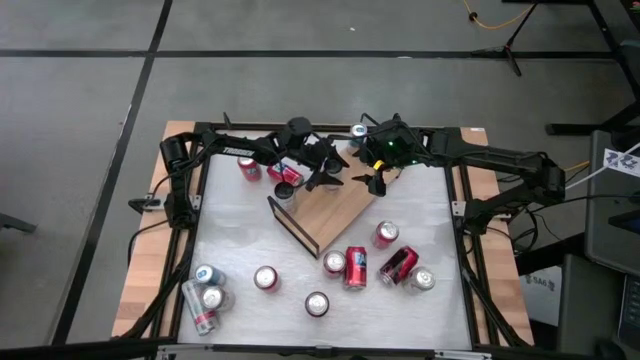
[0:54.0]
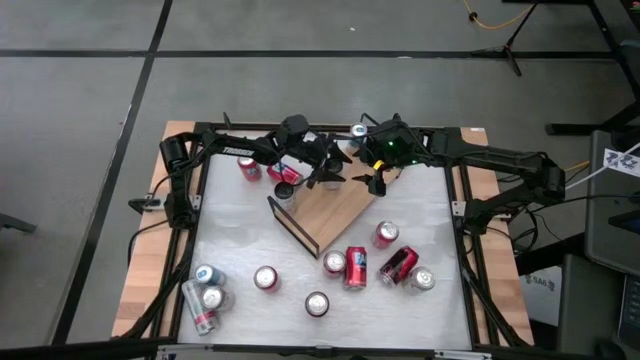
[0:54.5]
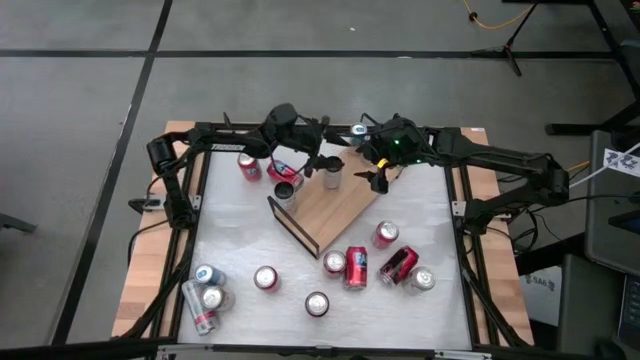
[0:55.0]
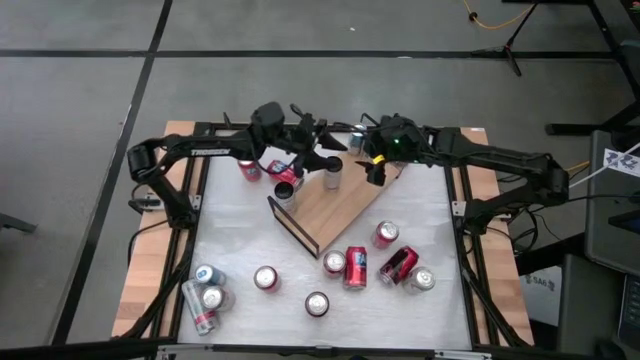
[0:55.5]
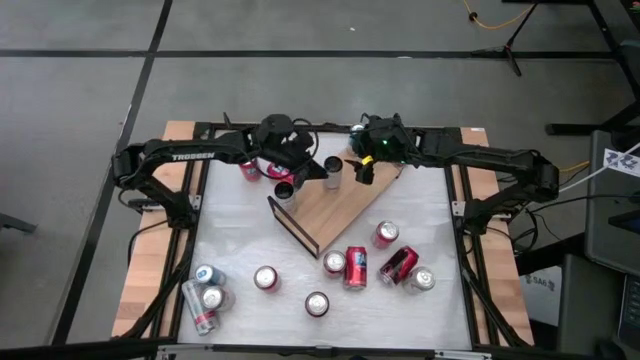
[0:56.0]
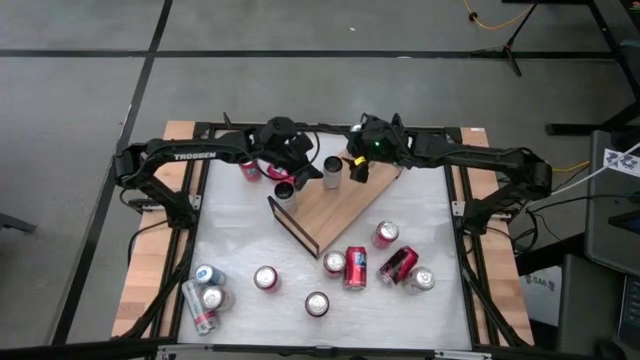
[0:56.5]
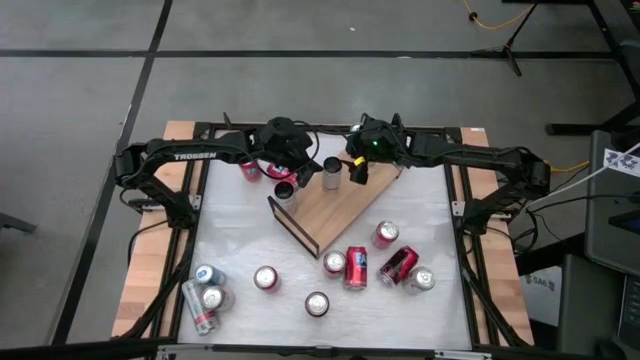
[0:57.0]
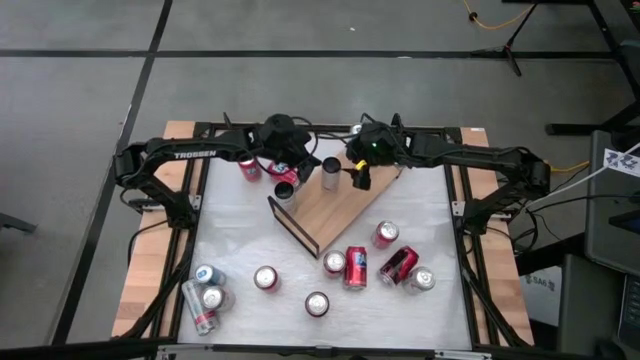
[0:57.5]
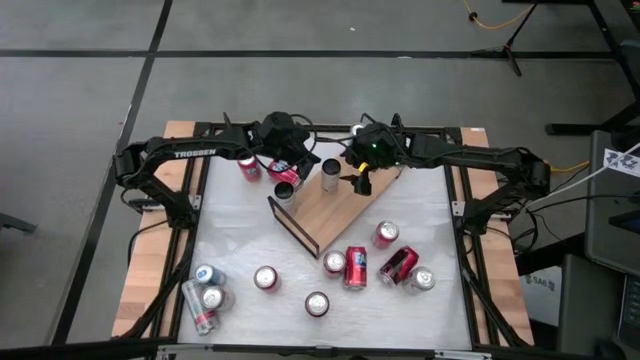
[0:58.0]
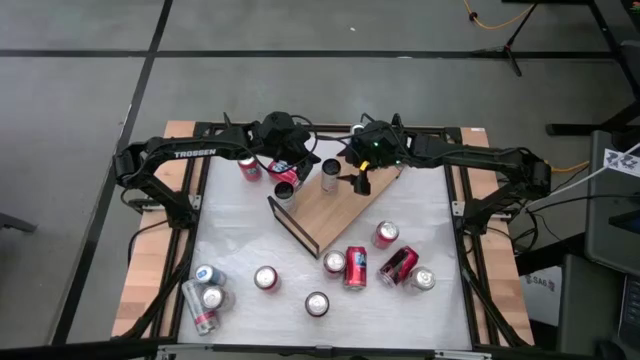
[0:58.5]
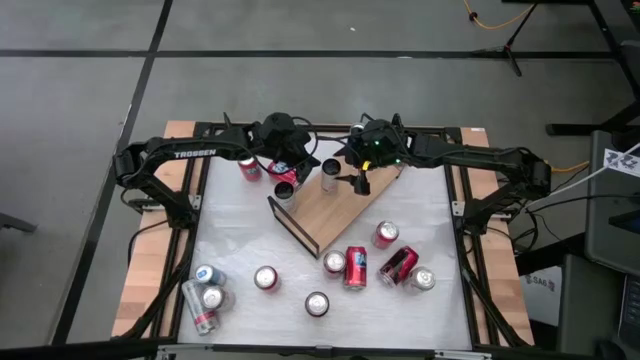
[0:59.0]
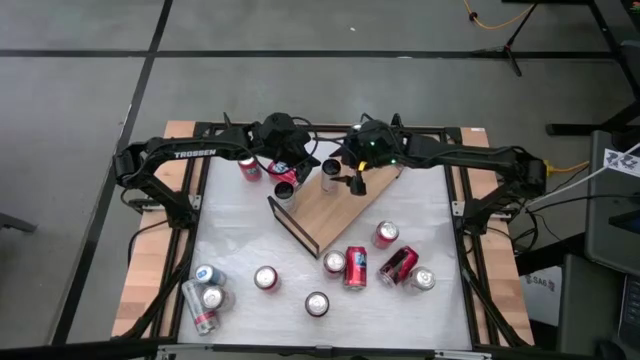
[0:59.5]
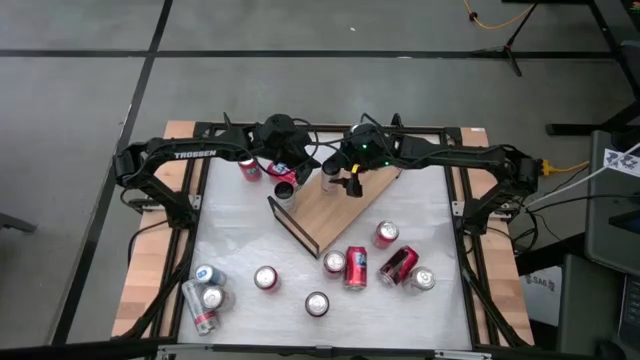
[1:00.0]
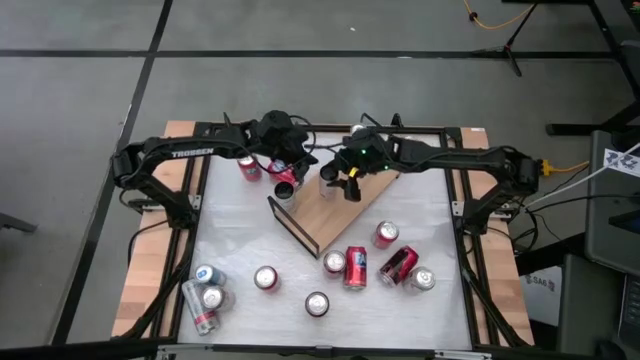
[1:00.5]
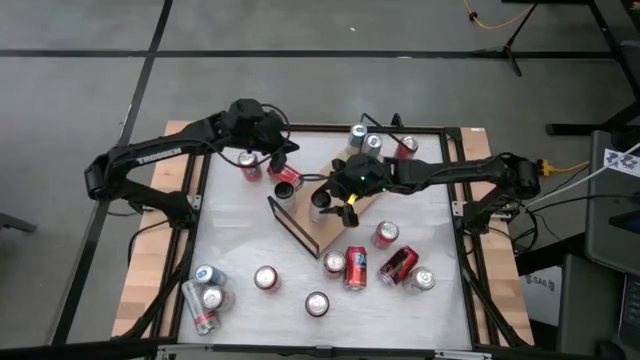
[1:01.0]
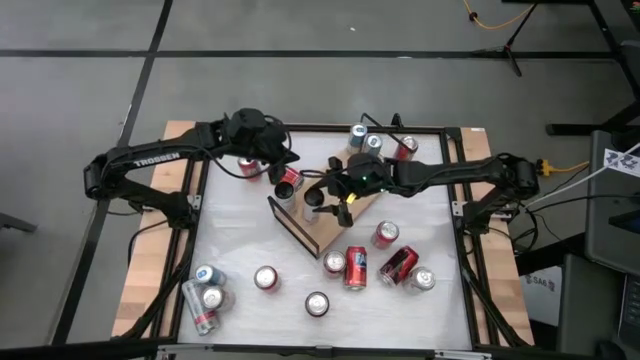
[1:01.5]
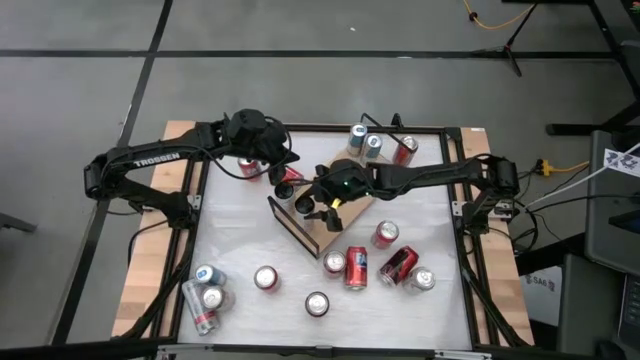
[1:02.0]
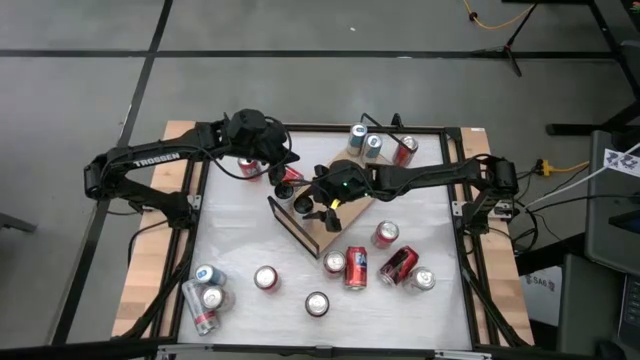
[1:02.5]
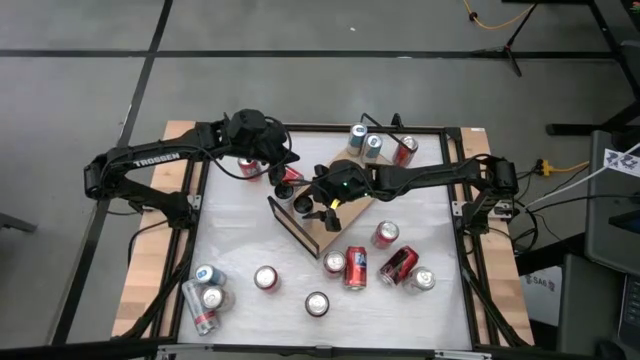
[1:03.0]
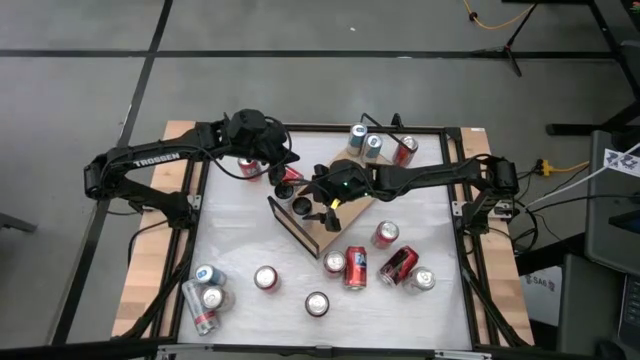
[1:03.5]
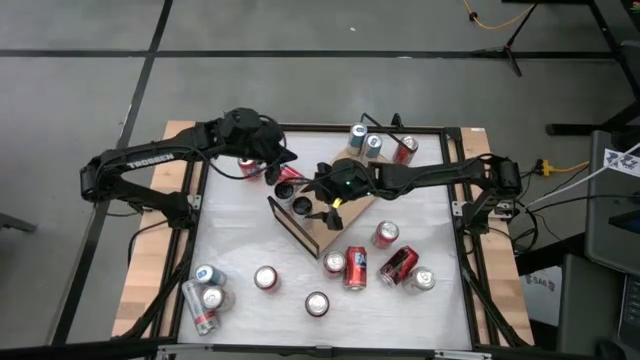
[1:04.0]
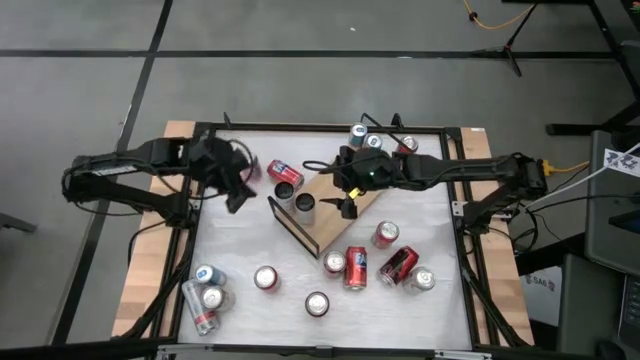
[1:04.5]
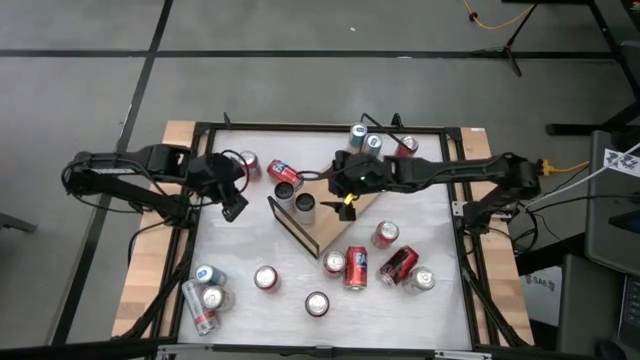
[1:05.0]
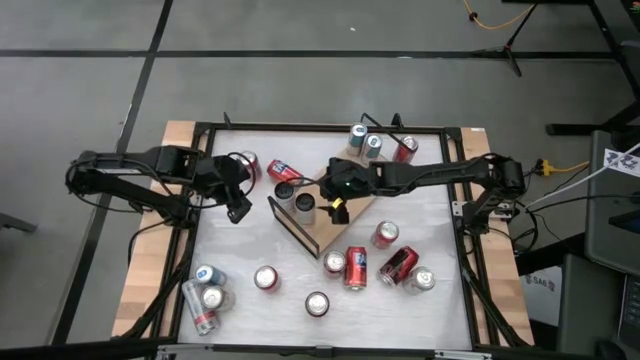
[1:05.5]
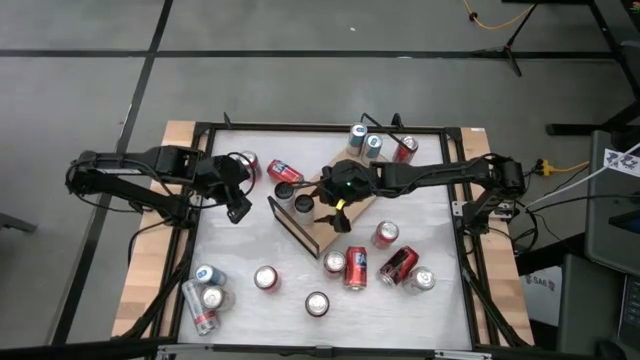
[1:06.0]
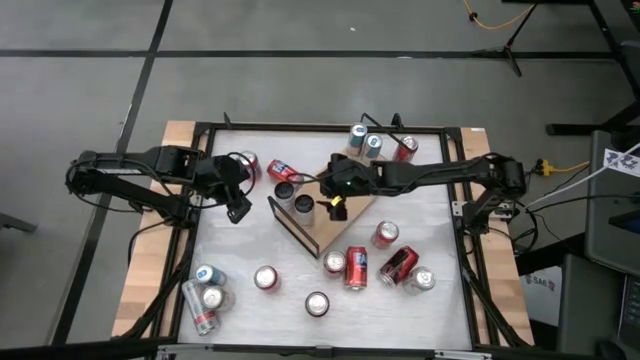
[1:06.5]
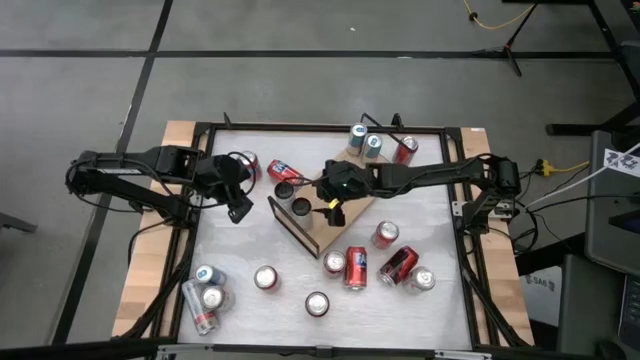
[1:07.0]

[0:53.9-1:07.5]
Task: Place canned beverage on shelf
Put the white pink soda can on the shelf aligned with the other white pink soda can

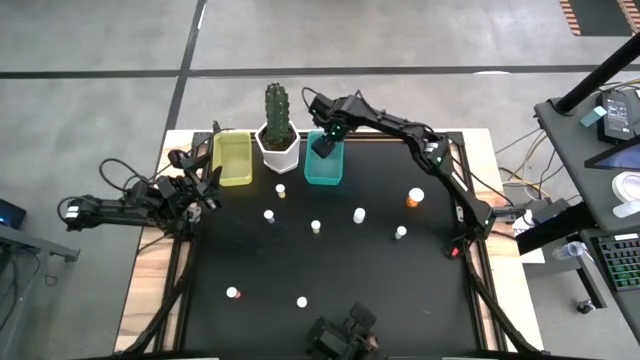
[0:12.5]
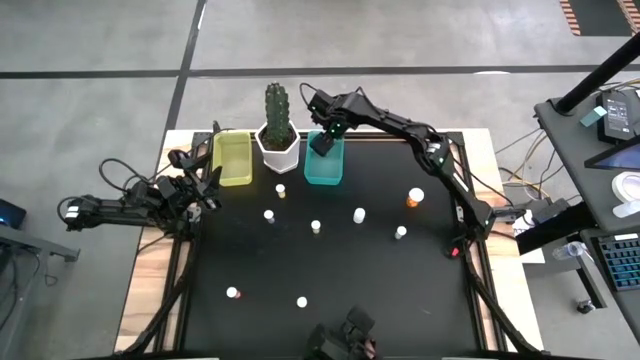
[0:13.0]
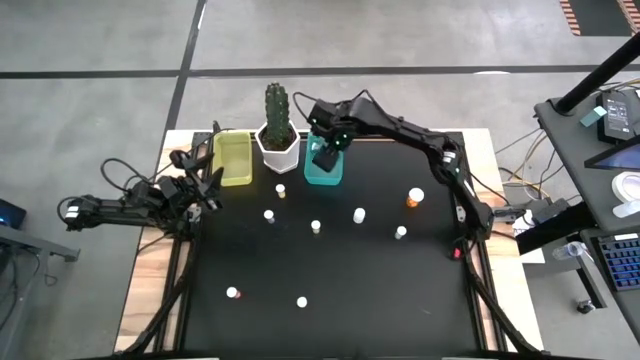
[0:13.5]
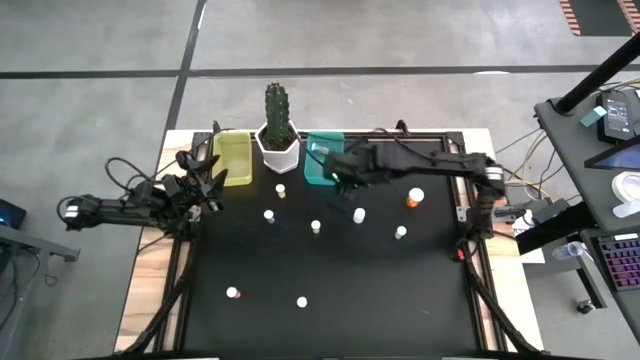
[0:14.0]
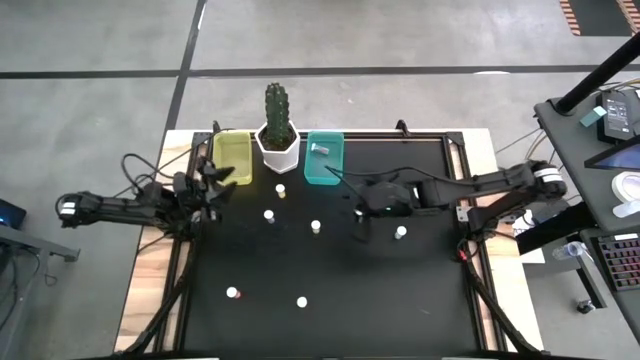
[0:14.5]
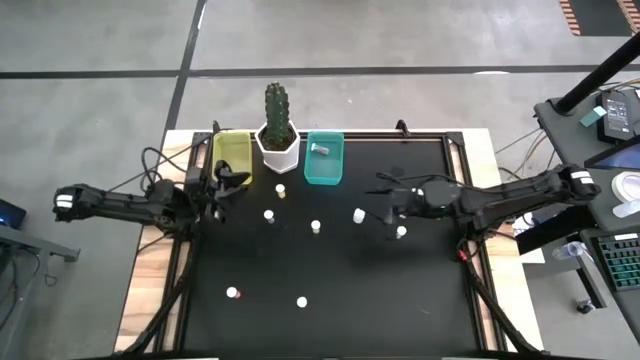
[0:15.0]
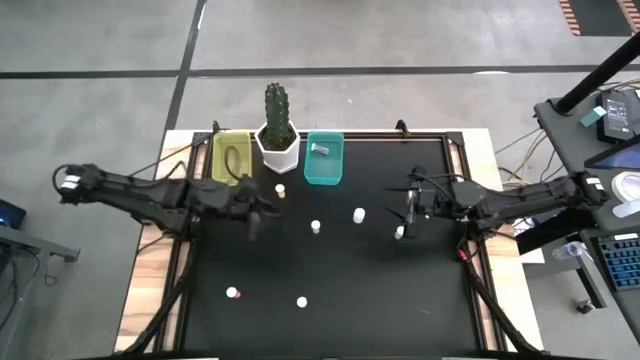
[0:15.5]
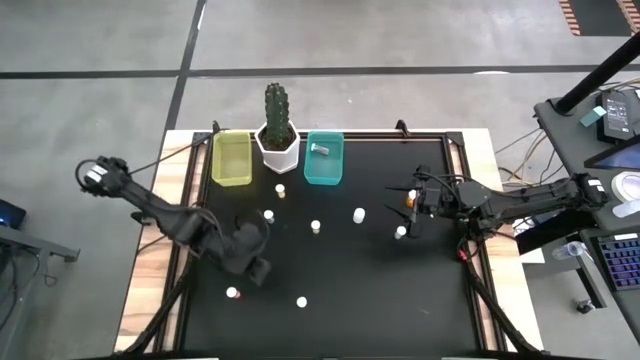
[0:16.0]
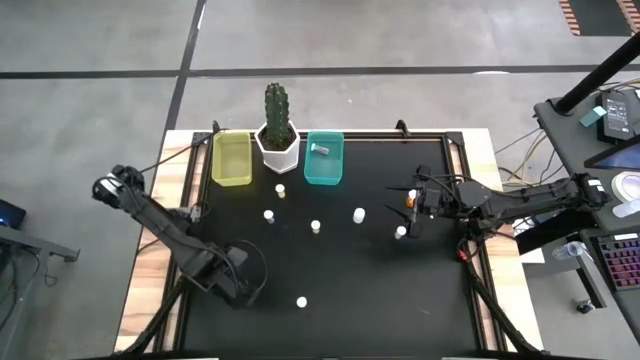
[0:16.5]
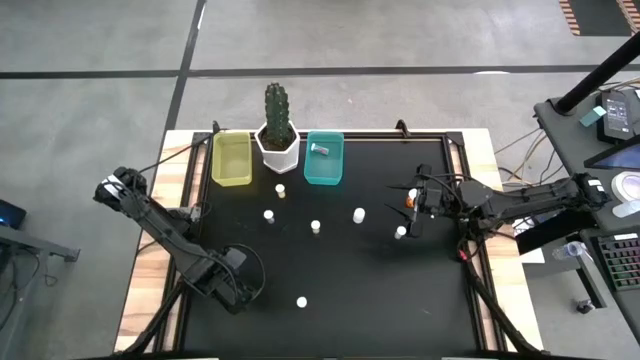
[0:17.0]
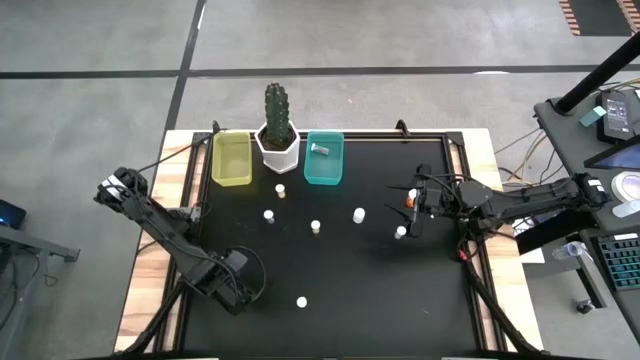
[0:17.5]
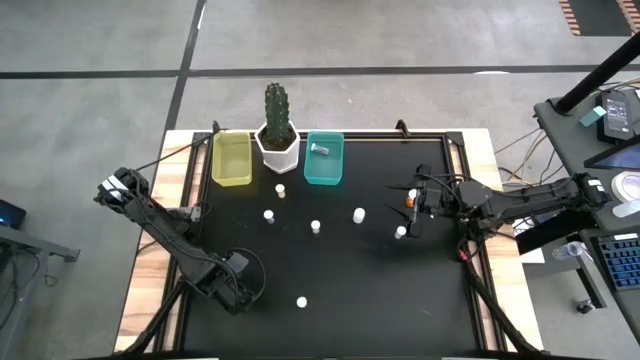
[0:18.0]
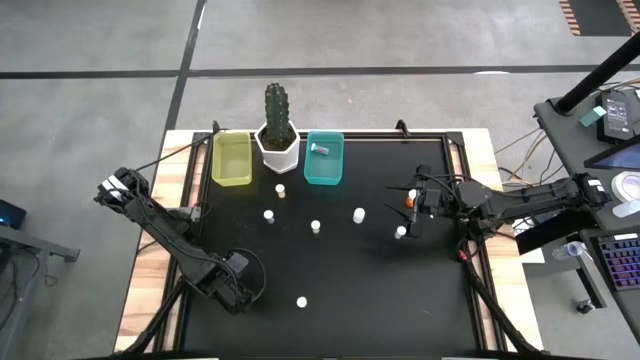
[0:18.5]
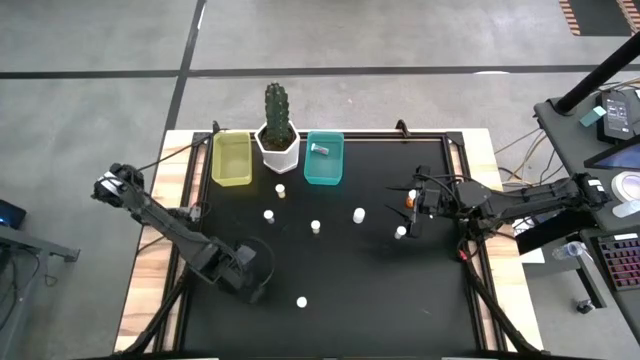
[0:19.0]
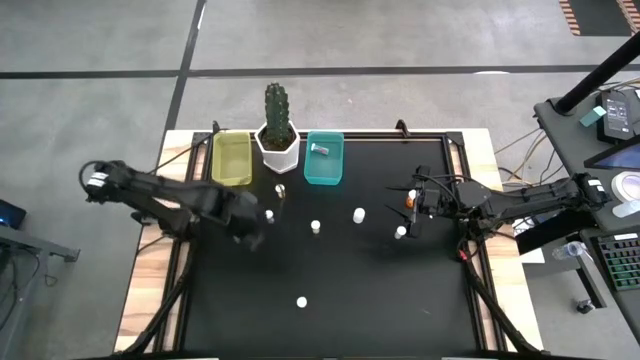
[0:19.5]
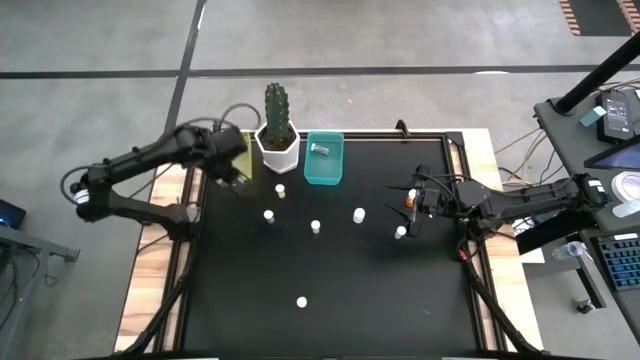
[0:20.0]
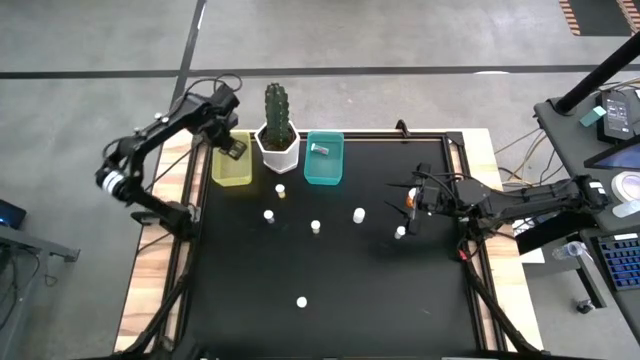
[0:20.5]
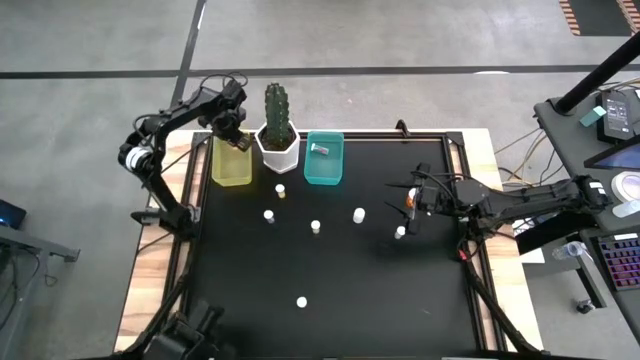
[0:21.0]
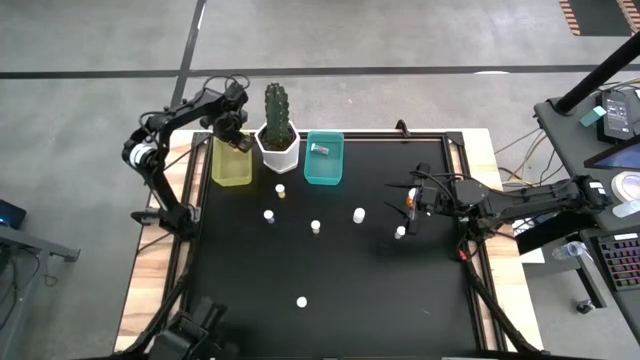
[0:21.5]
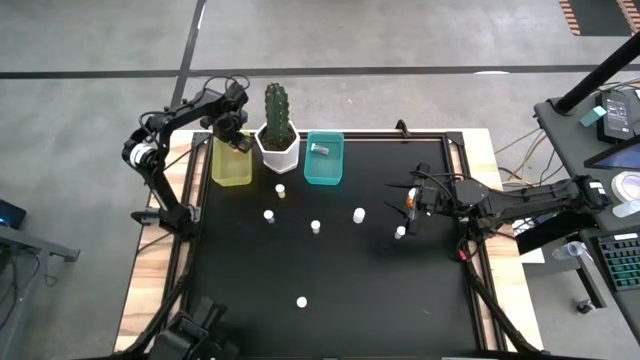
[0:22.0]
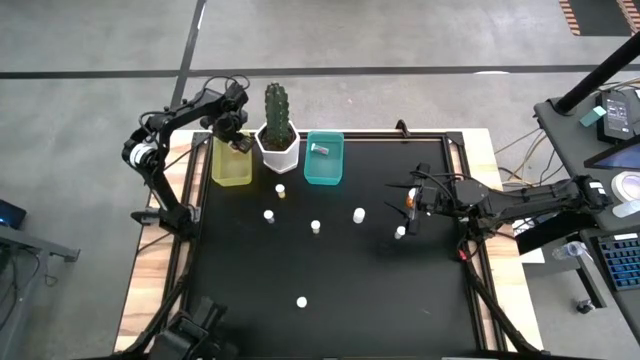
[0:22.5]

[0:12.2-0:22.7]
Task: Pick and place medicine bottles into bin by pill shape (circle, oval)
Put the pink tablet bottle into the yellow bin
